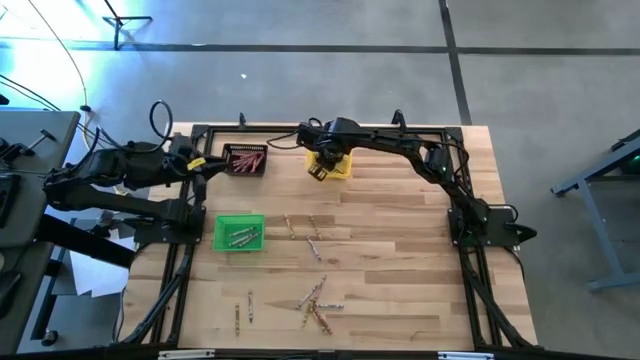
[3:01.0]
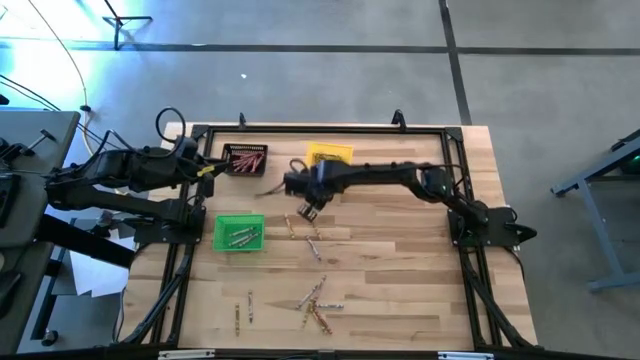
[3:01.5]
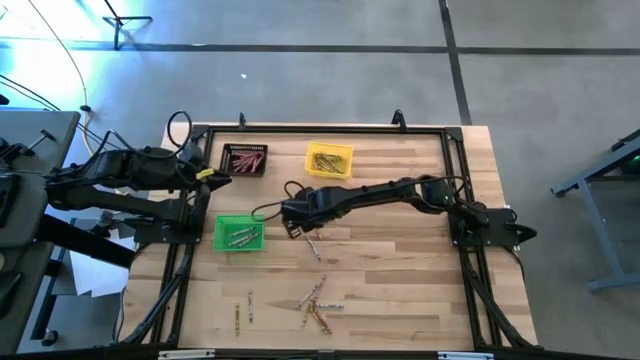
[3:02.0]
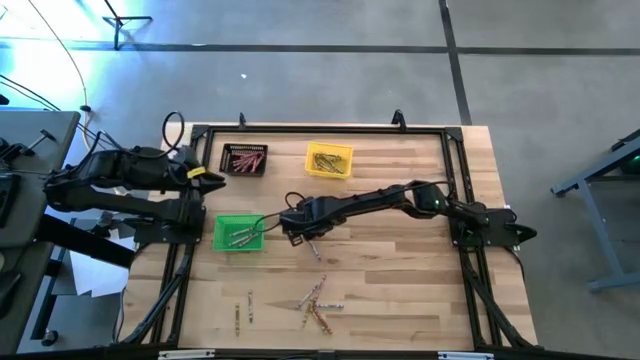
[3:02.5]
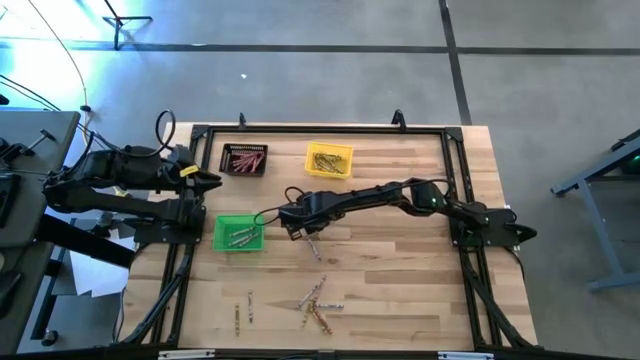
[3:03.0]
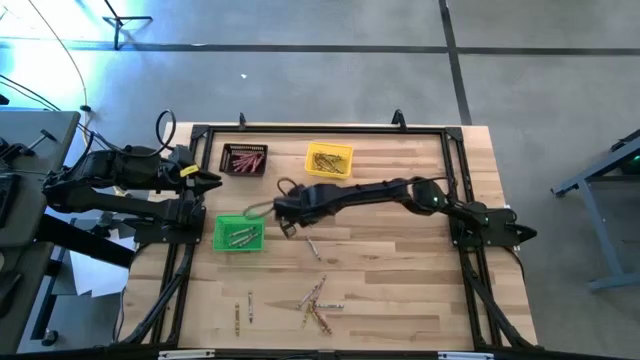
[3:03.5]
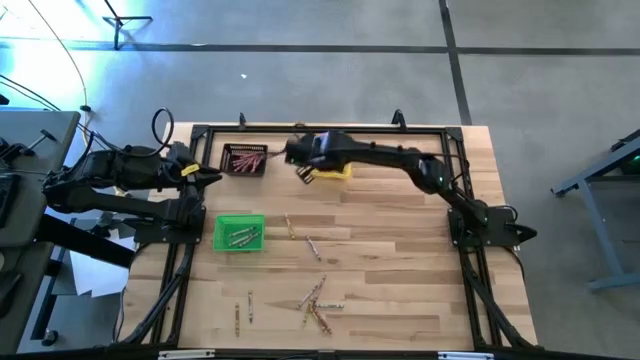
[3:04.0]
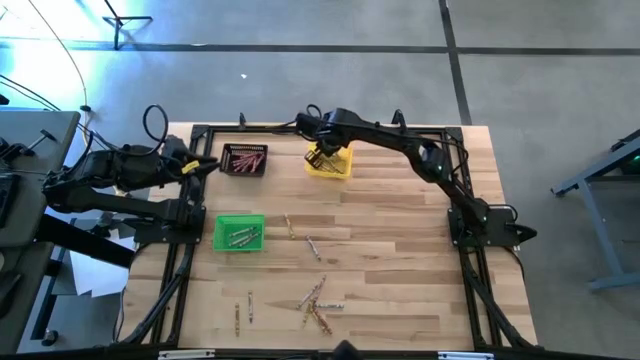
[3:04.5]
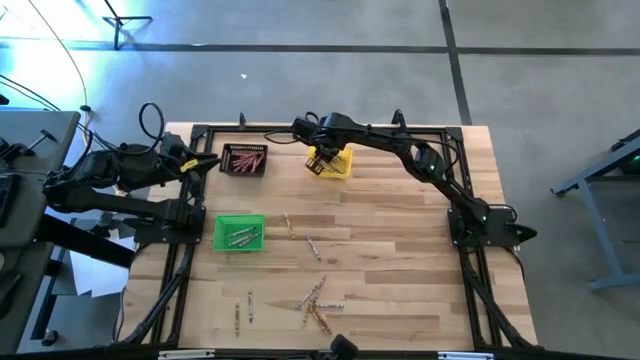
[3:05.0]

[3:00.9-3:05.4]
Task: Sort crayons
Put the yellow crayon into the yellow bin

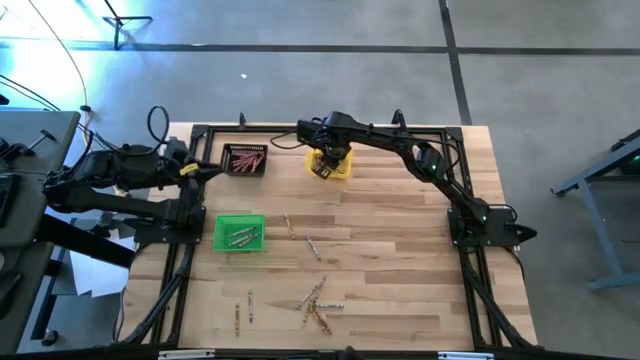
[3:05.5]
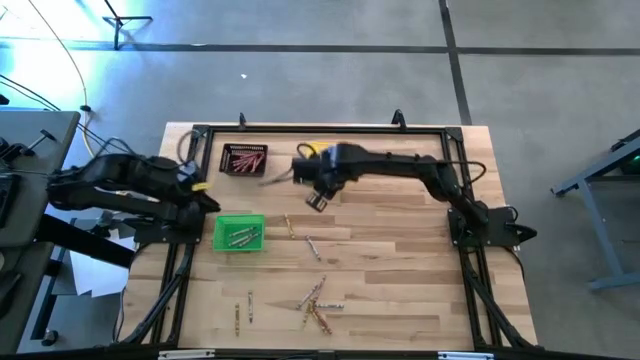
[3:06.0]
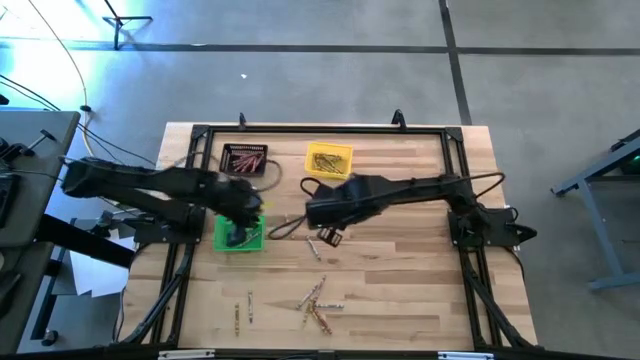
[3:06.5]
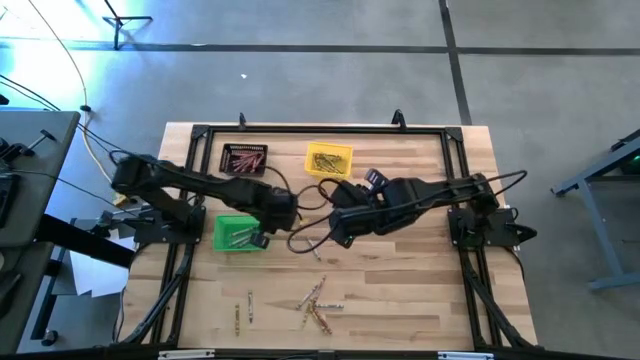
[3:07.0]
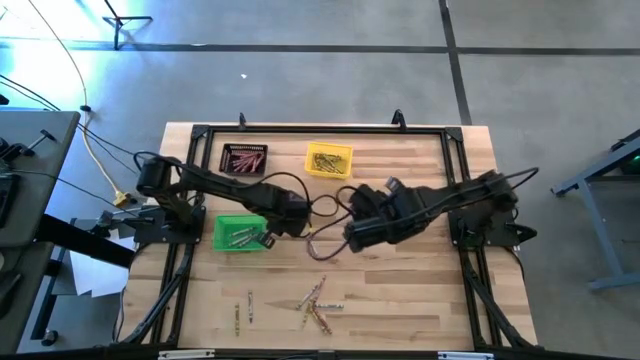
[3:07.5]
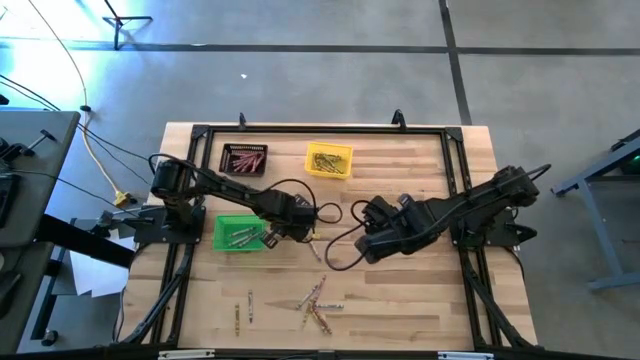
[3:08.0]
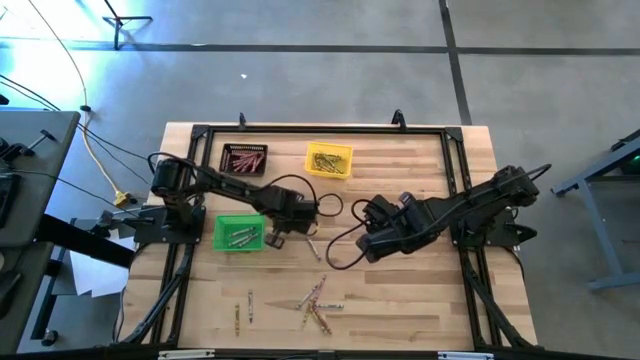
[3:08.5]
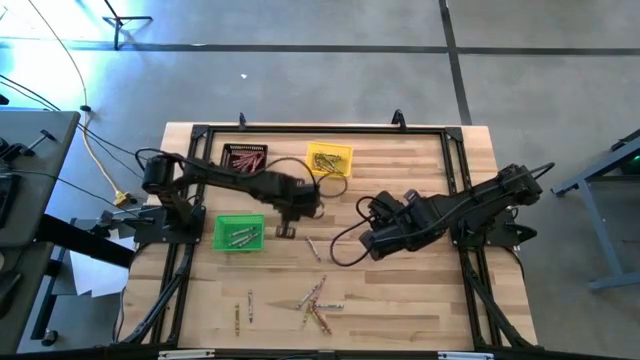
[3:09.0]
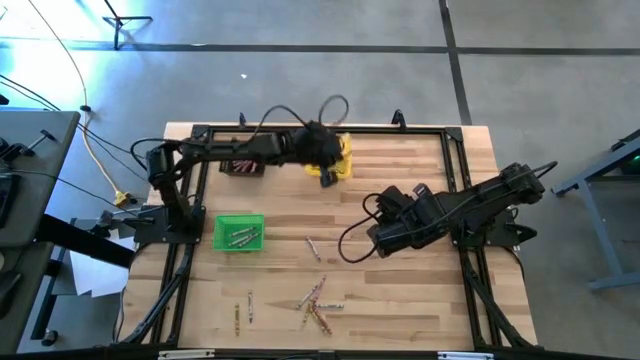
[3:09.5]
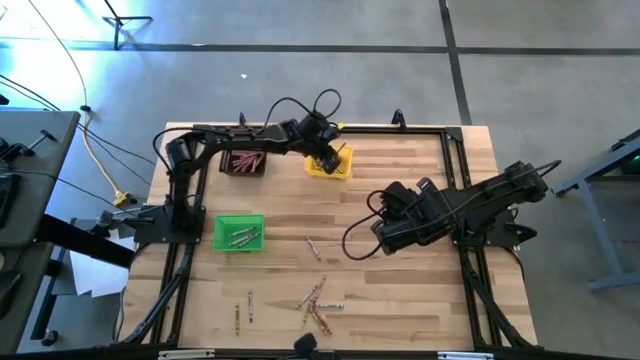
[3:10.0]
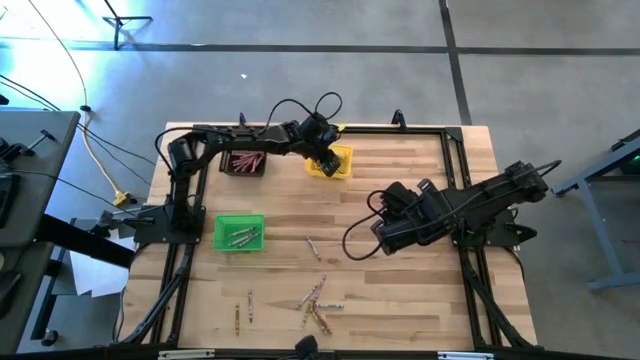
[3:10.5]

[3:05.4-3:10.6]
Put the yellow crayon into the yellow bin

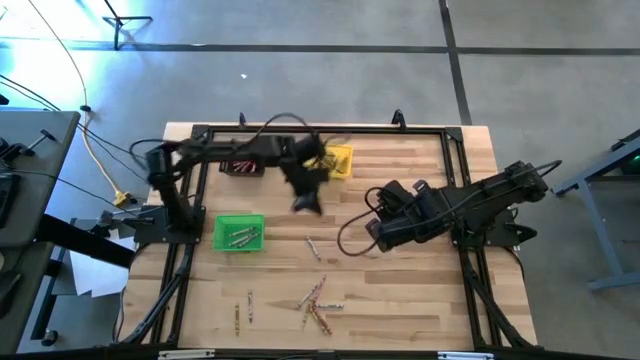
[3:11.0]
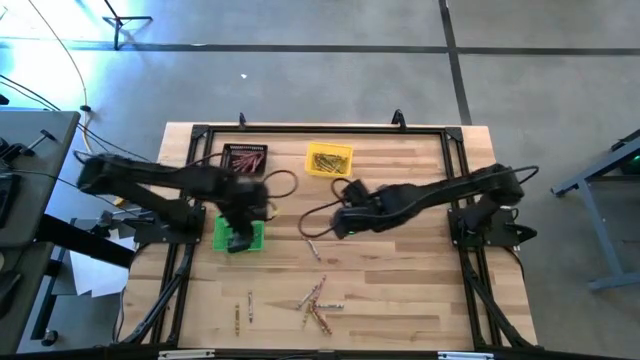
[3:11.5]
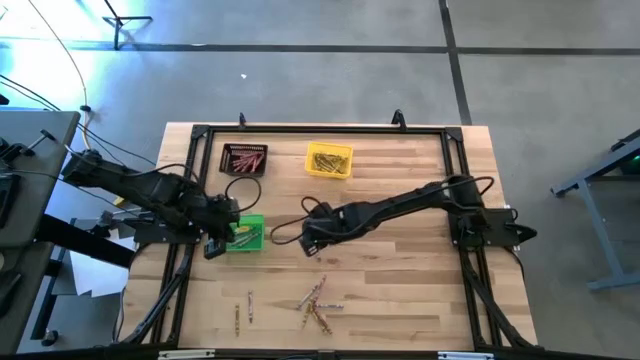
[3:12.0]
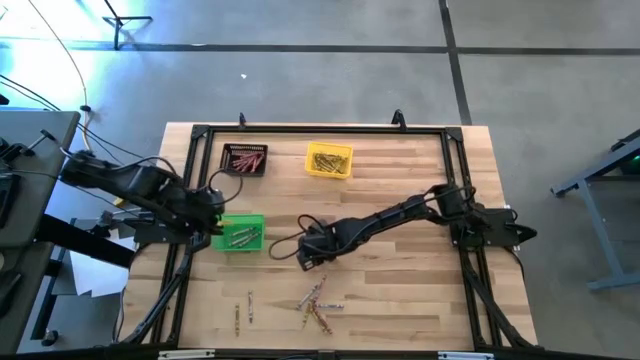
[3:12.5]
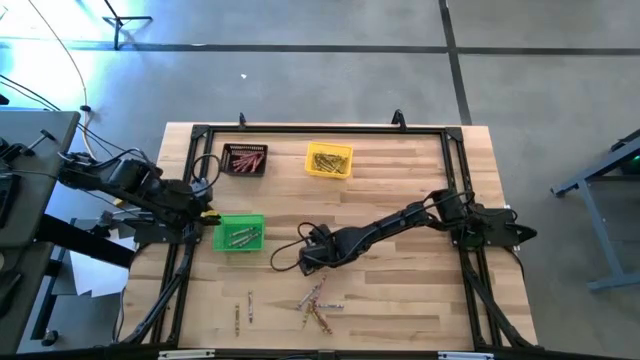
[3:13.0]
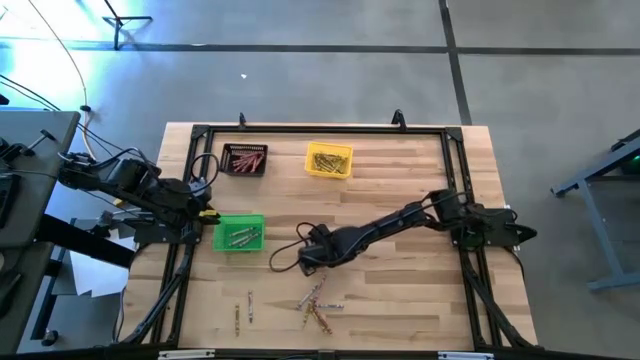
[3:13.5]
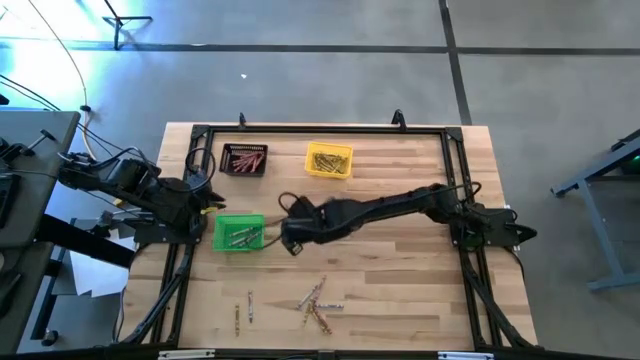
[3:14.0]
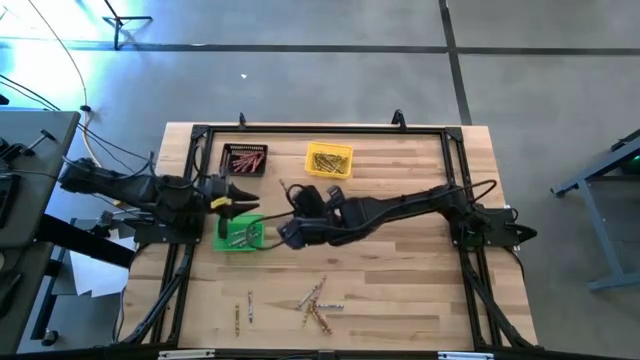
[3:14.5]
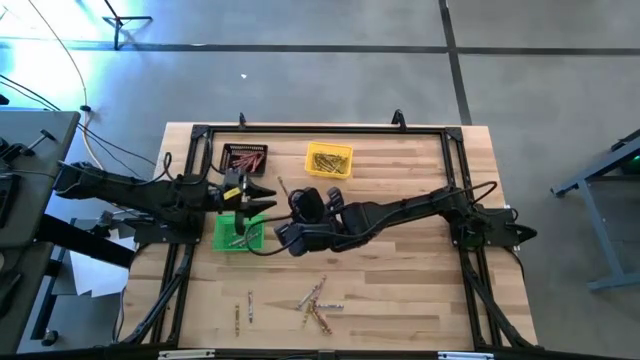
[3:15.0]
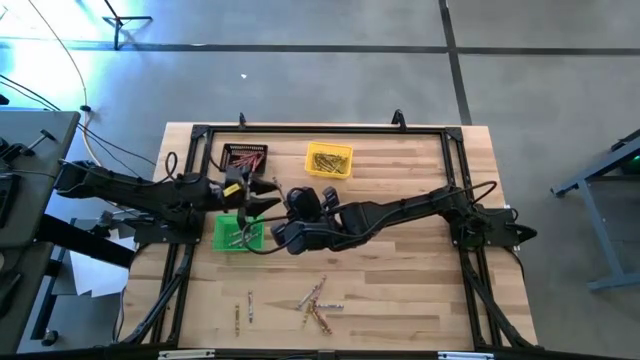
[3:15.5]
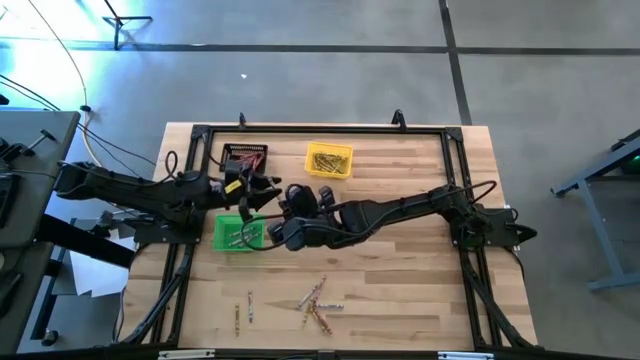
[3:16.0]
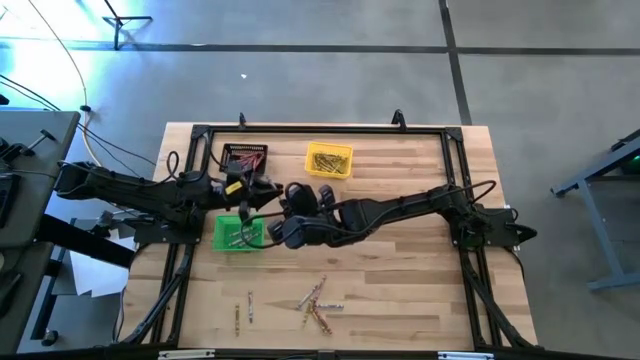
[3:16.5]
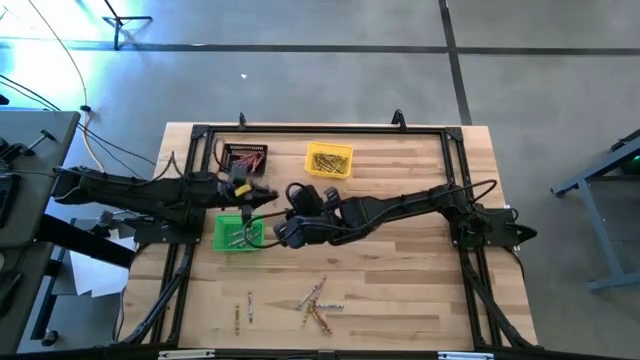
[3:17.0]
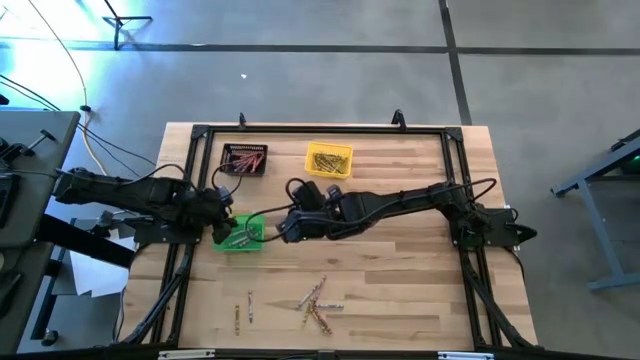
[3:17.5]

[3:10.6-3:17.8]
Put the blue crayon into the green bin

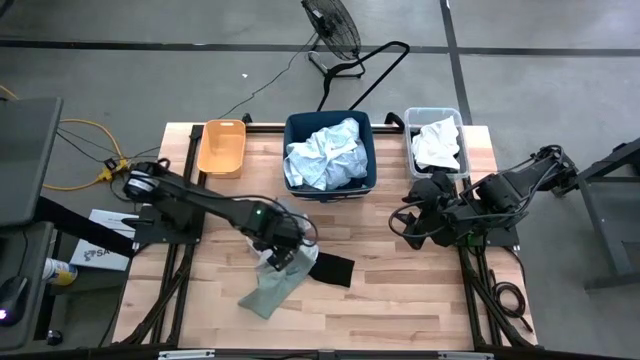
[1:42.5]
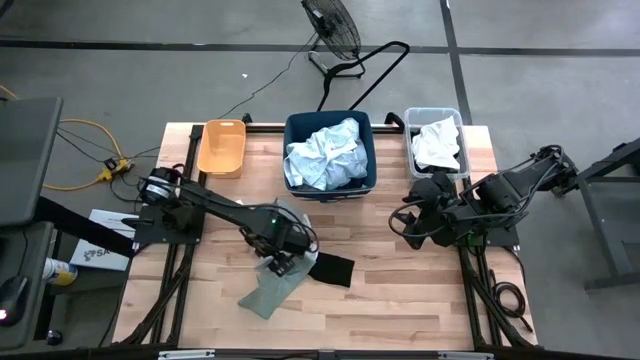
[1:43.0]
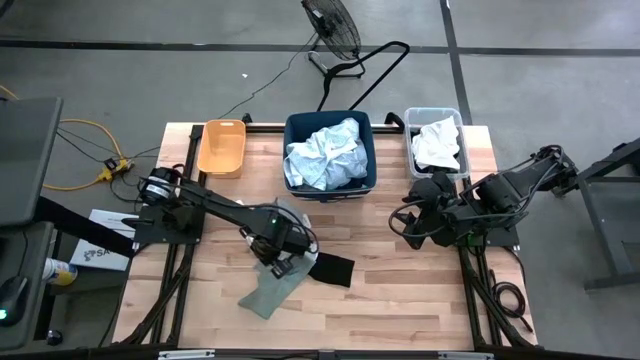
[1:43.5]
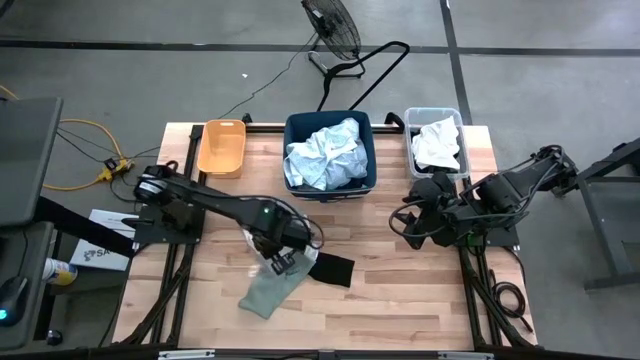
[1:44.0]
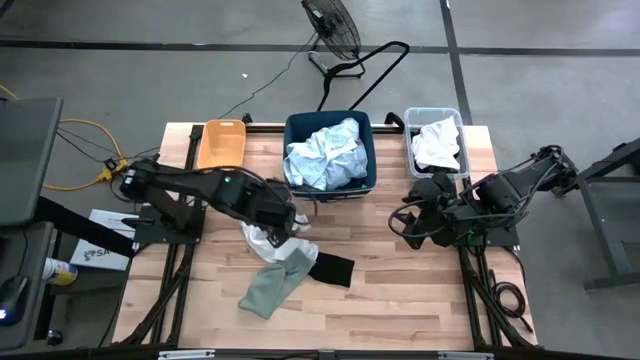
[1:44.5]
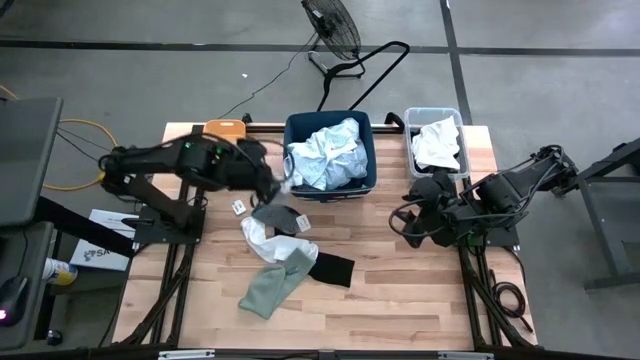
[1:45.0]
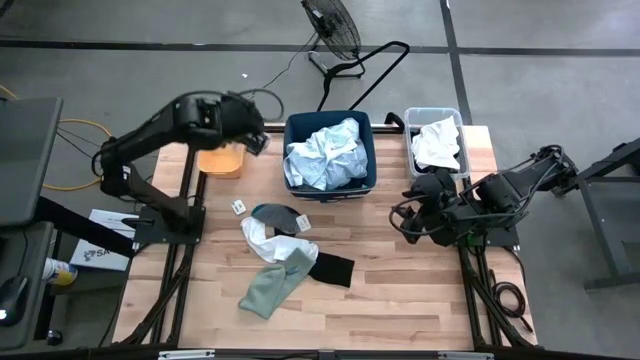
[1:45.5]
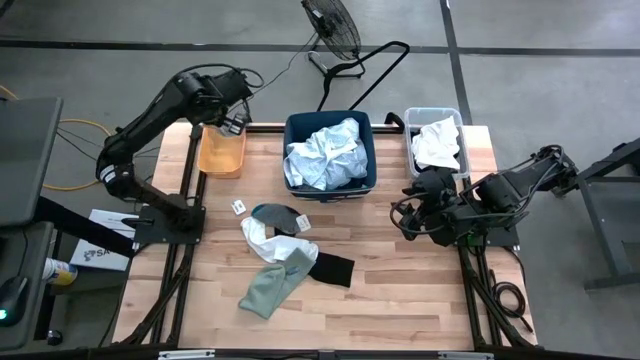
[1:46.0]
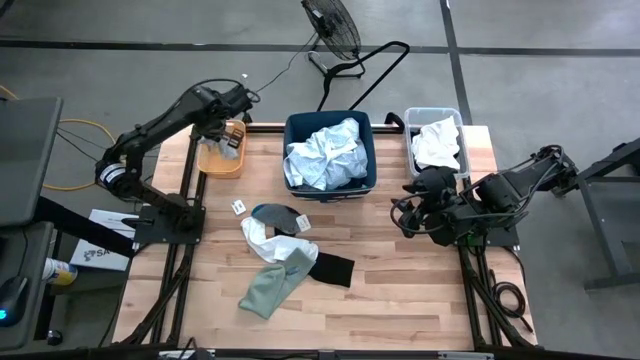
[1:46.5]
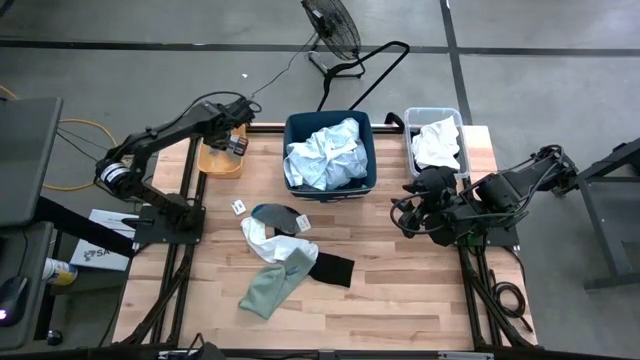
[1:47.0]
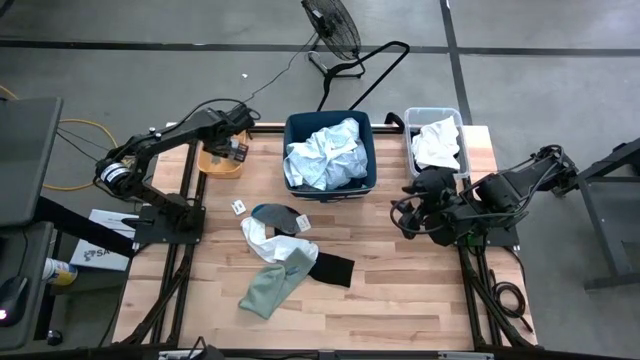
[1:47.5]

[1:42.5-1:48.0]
Task: Pick & Place Cloths
Put the gray sock into the yellow bin
